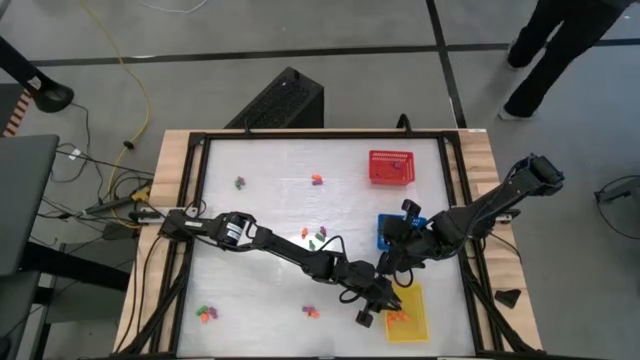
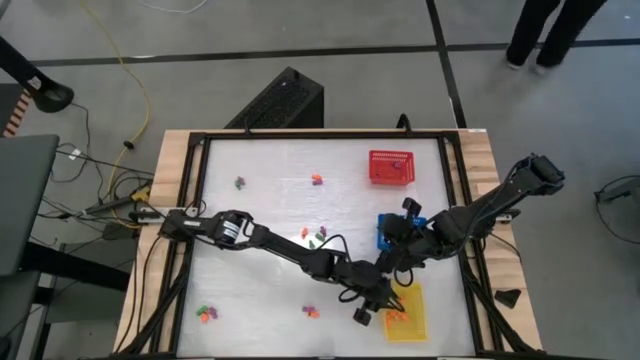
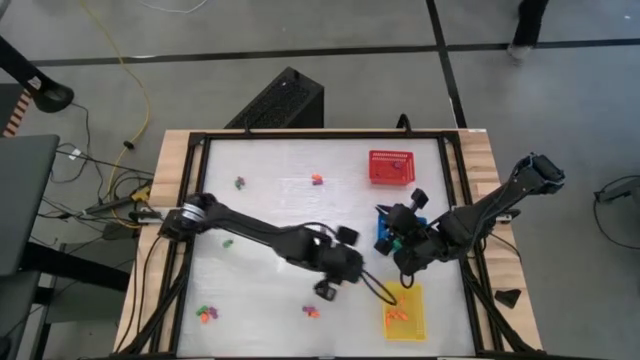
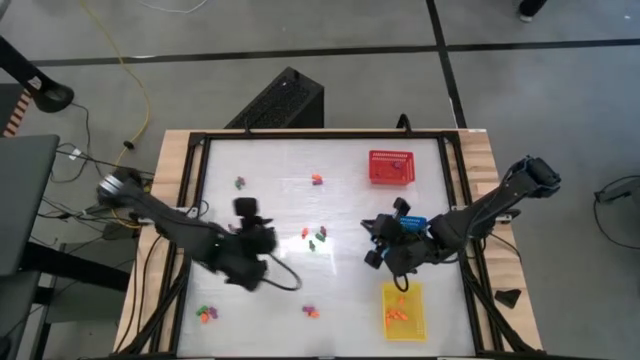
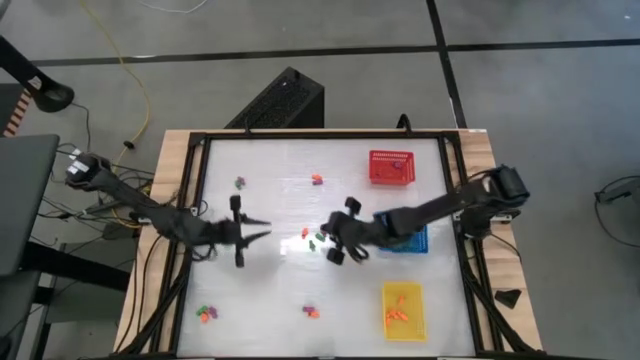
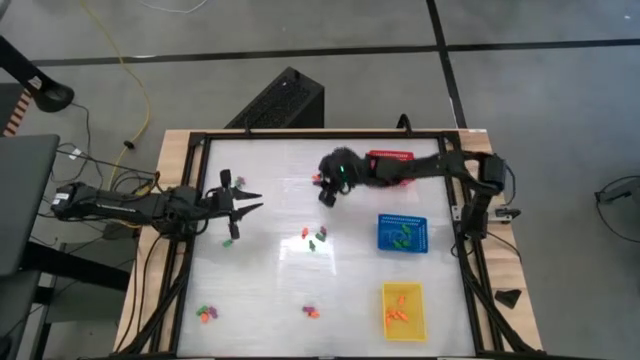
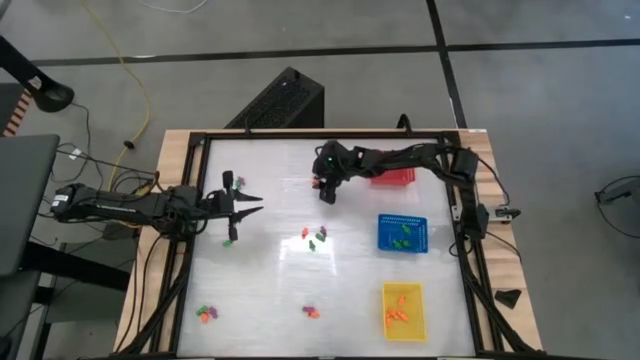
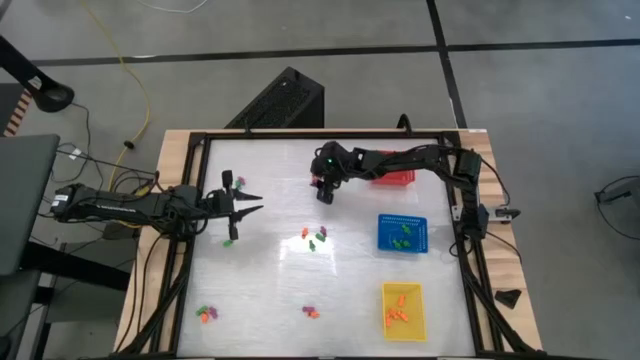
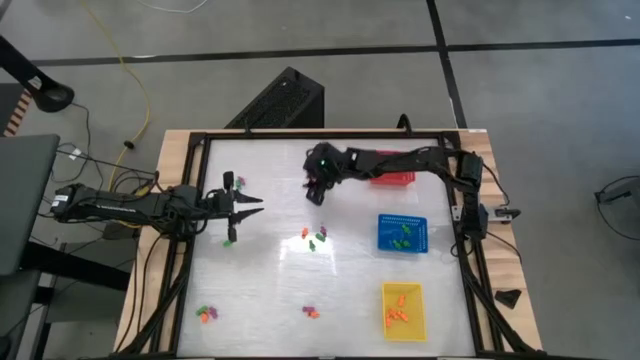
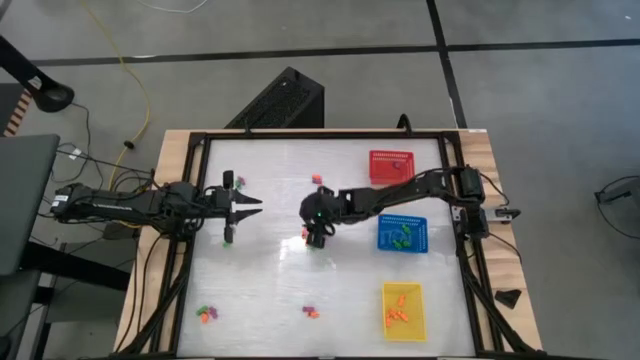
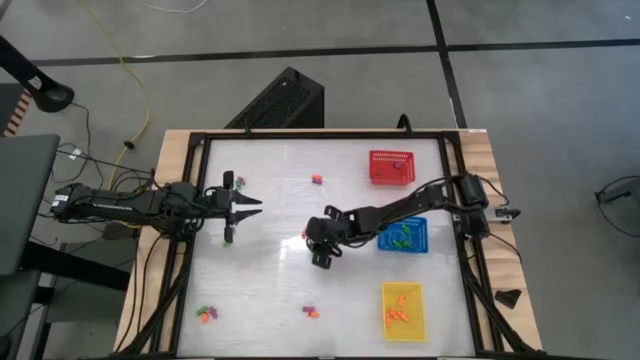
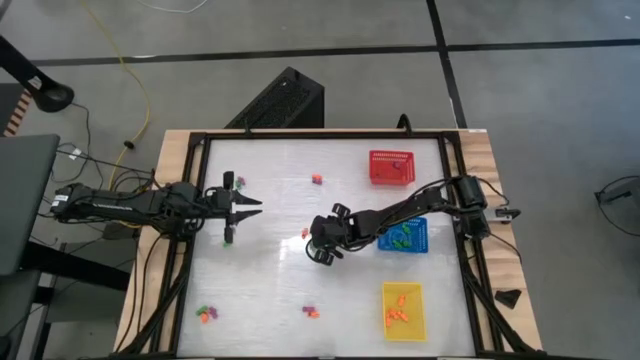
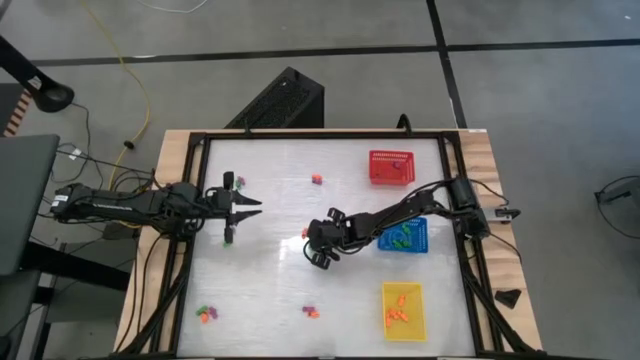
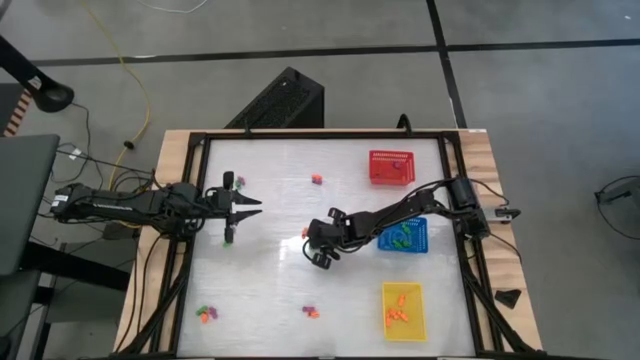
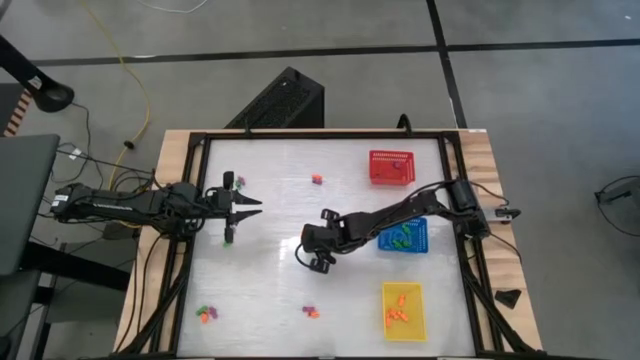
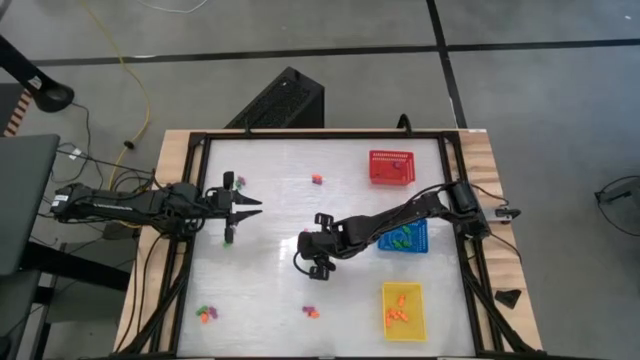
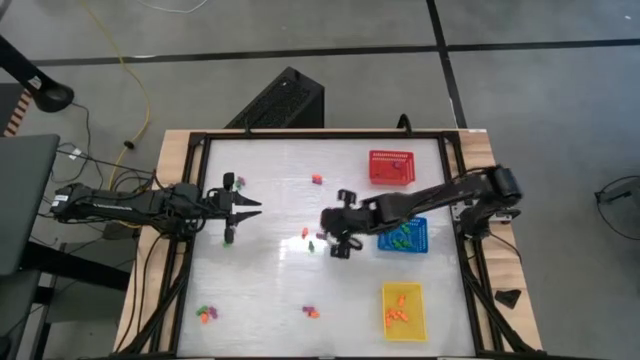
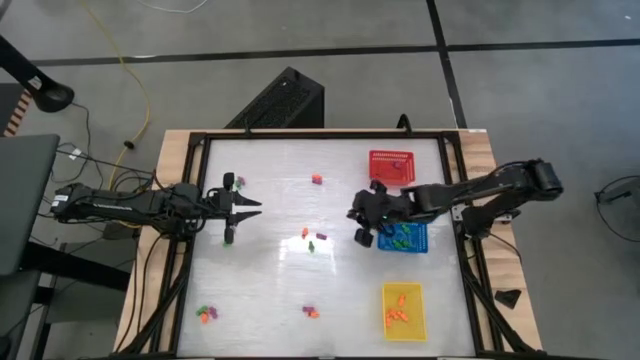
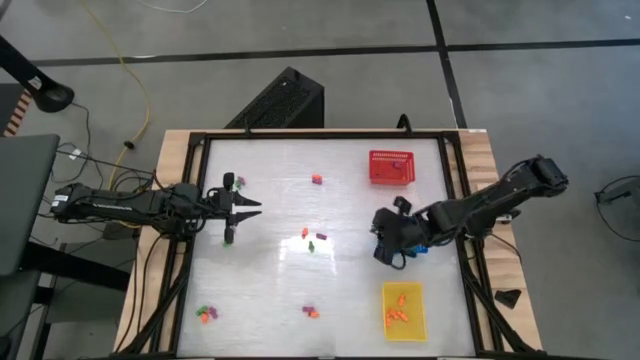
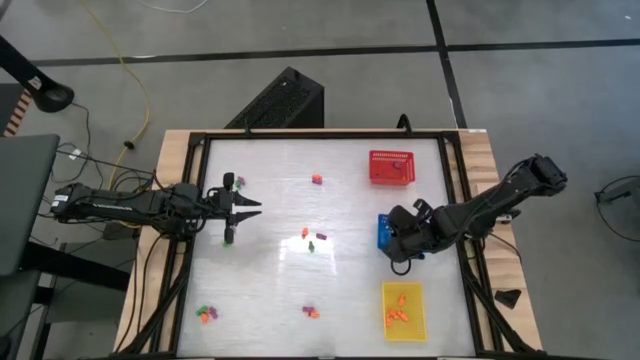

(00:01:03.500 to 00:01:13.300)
Task: Sort Halloween decoration
Put the green skeleton toy into the blue basket

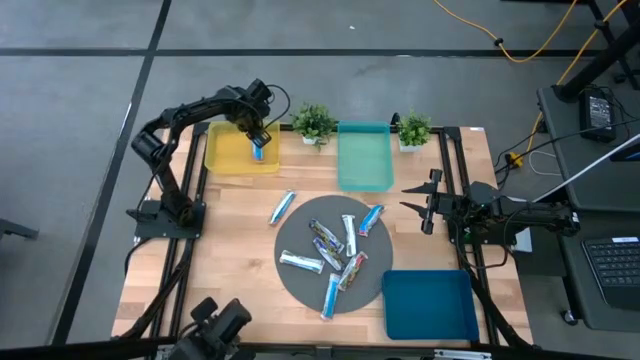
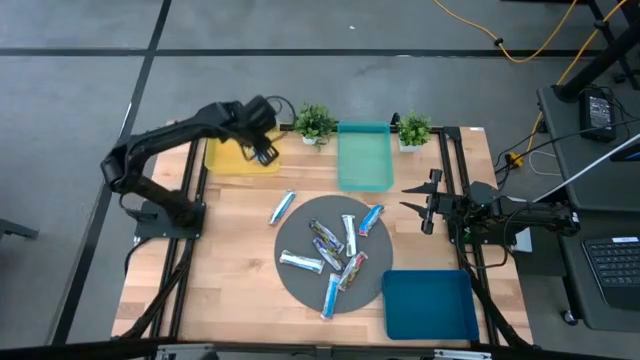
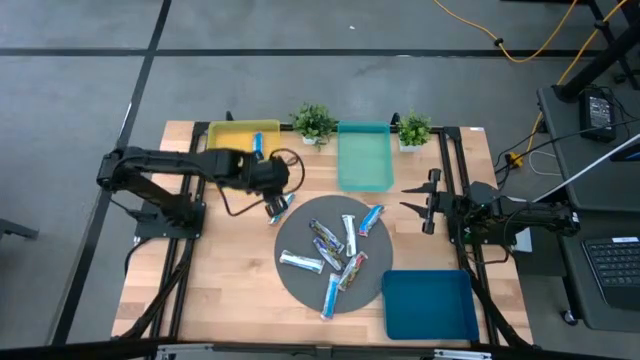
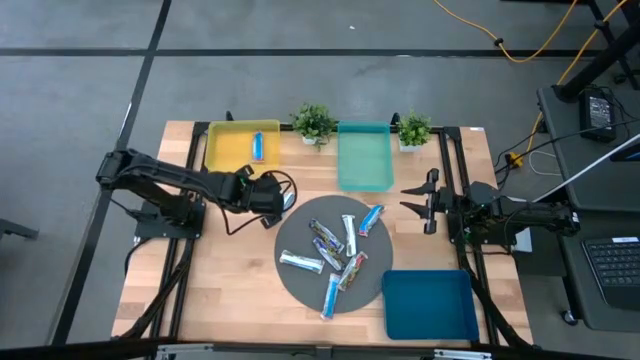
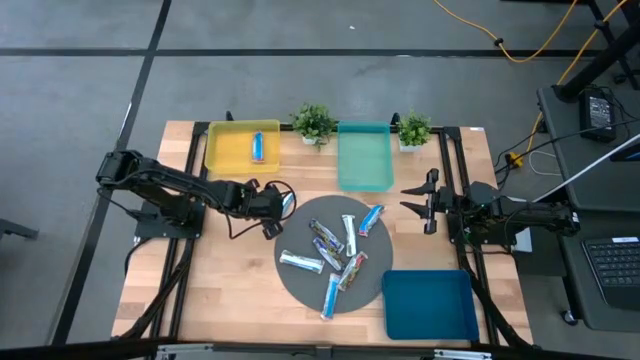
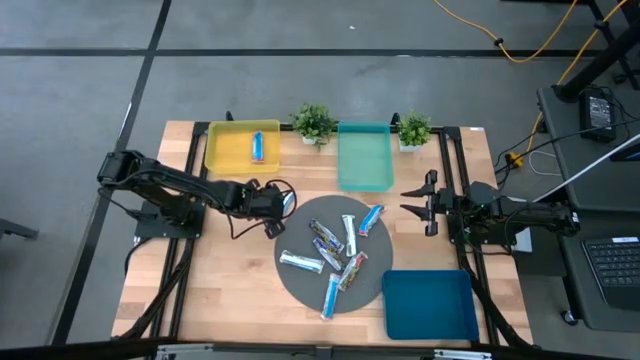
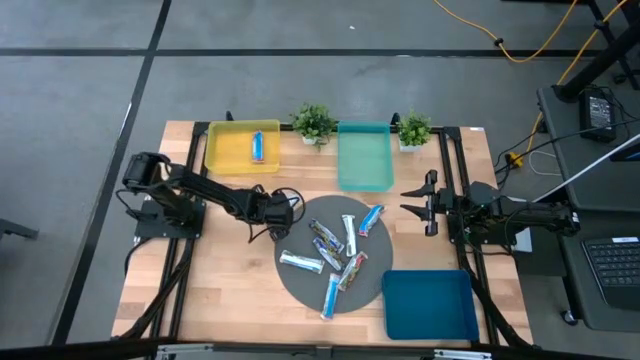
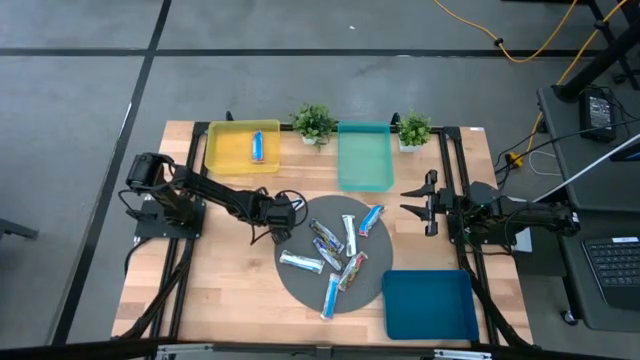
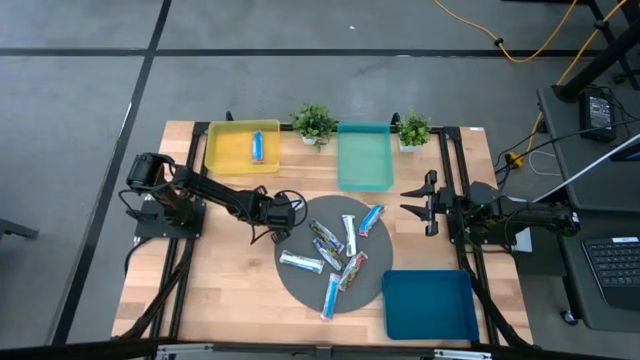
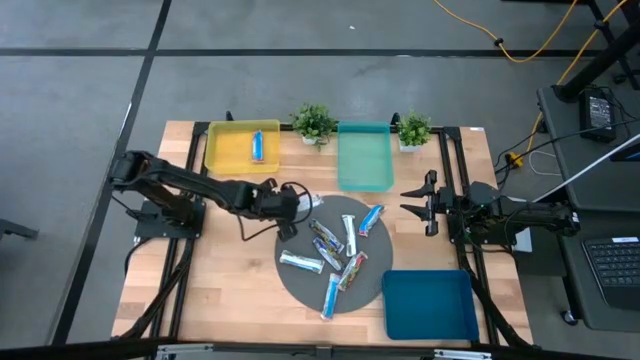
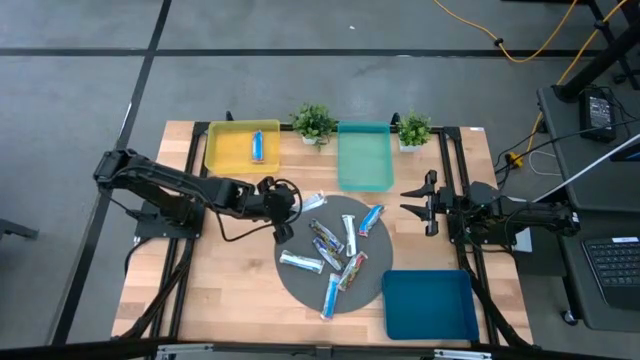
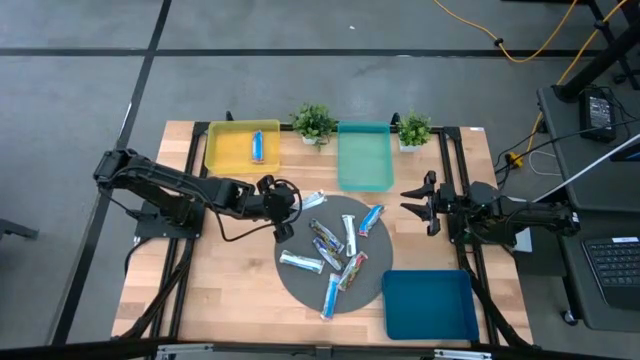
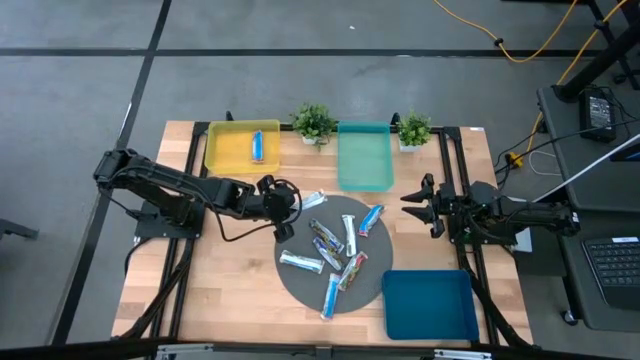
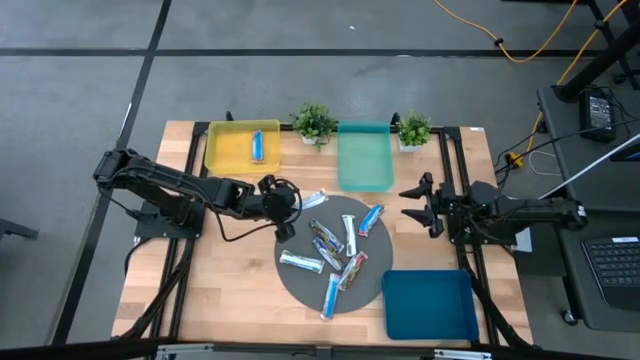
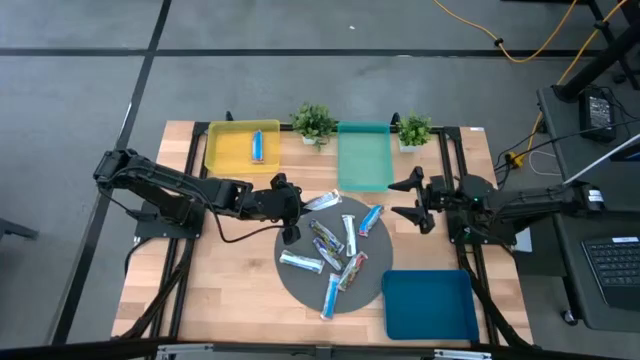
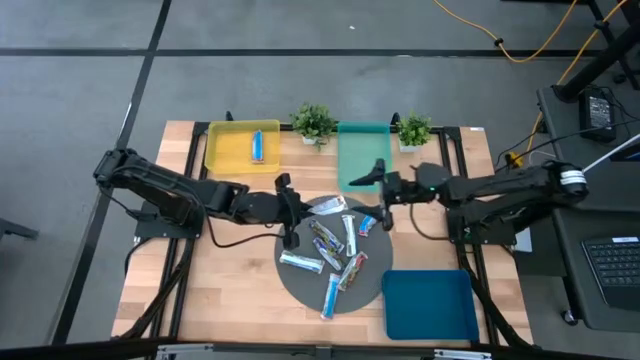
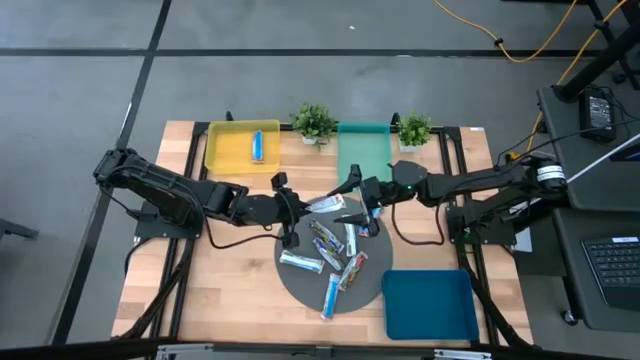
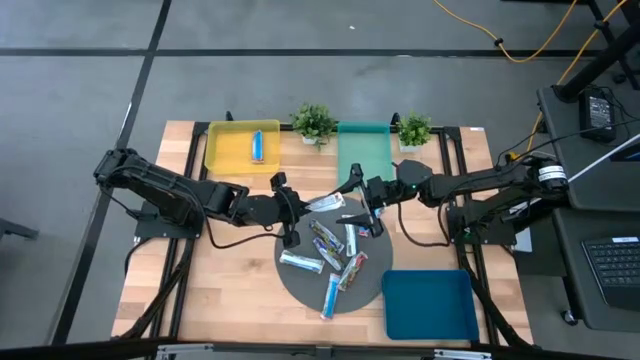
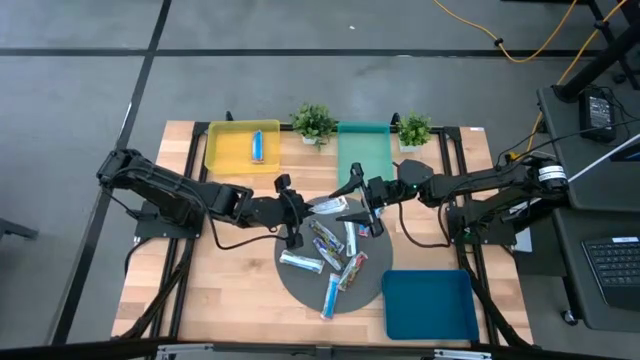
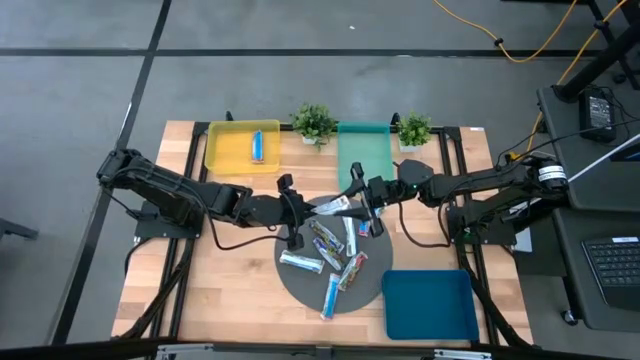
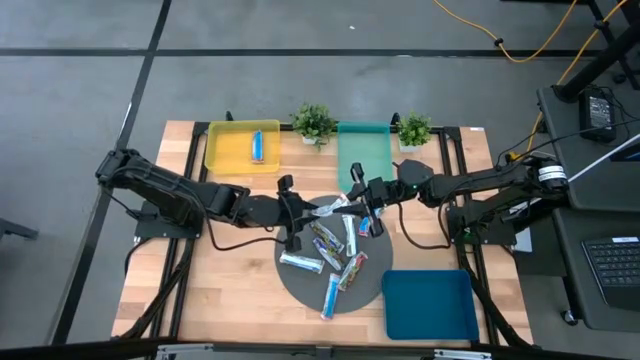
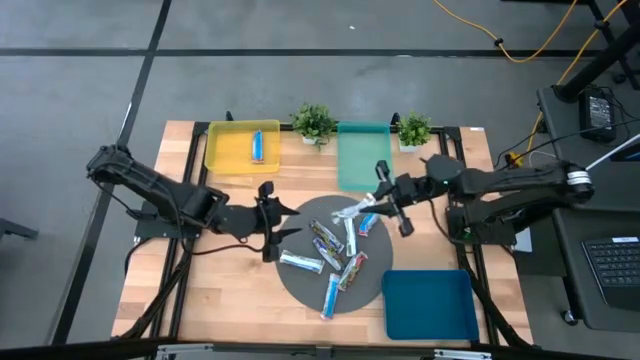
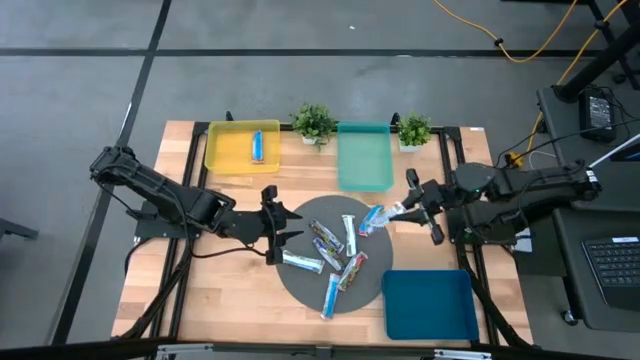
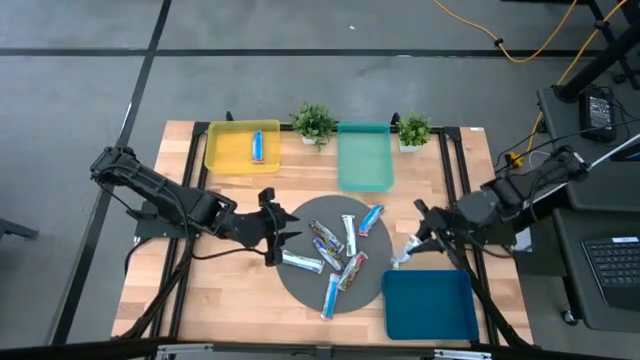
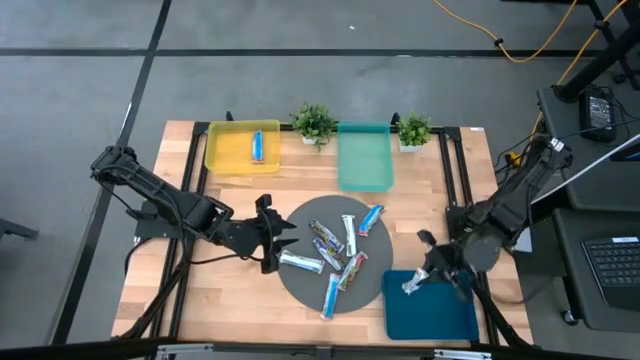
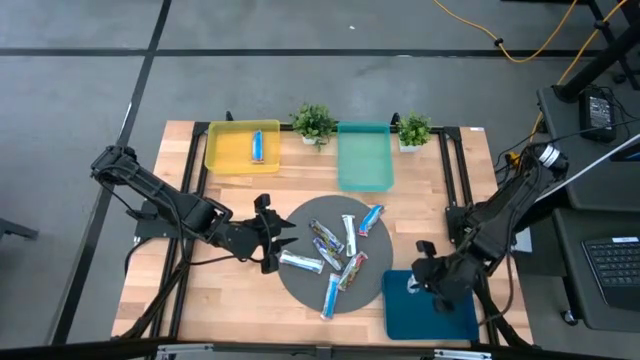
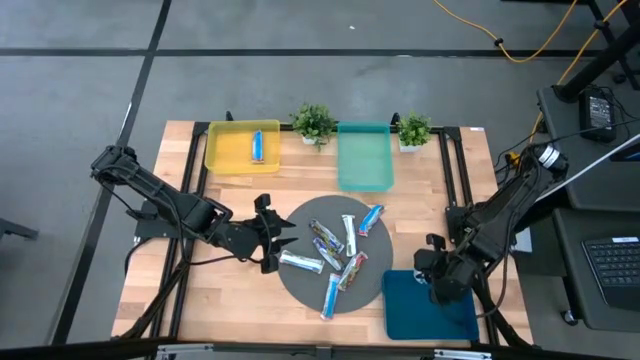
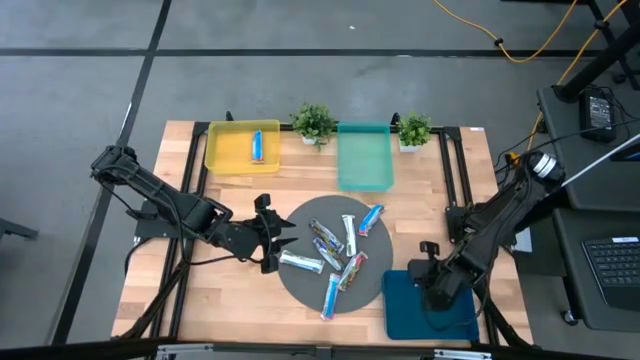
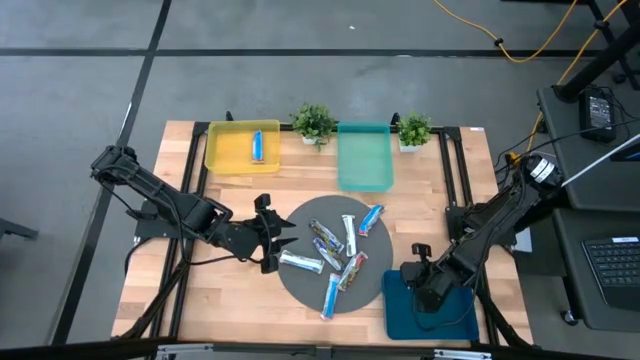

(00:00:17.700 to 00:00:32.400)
Task: Pick and place Granola Bars by type
Put the yellow granola bar into the blue bin
